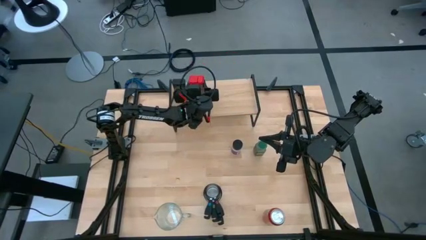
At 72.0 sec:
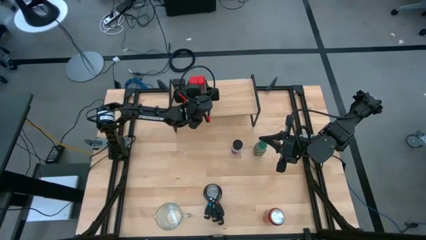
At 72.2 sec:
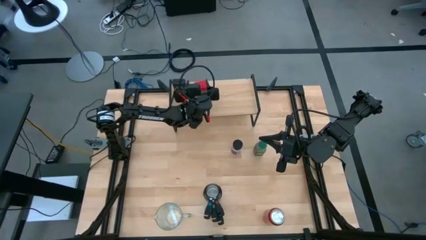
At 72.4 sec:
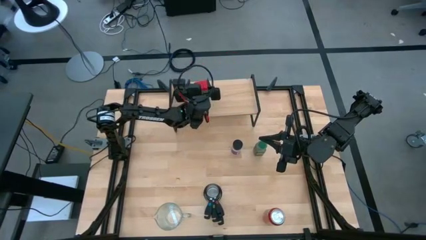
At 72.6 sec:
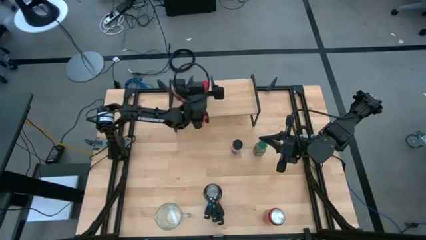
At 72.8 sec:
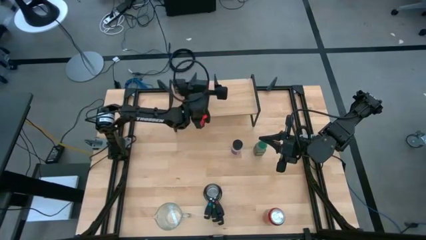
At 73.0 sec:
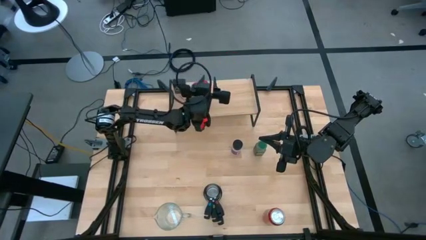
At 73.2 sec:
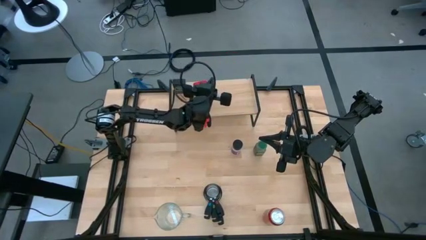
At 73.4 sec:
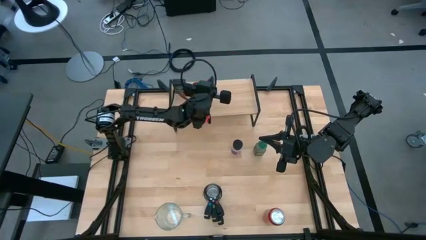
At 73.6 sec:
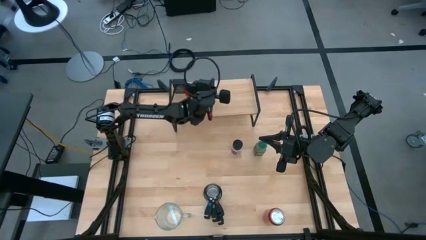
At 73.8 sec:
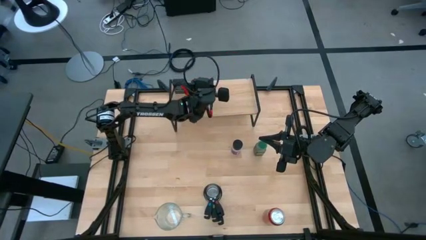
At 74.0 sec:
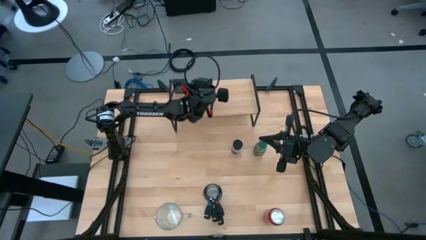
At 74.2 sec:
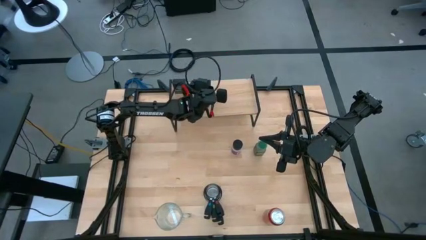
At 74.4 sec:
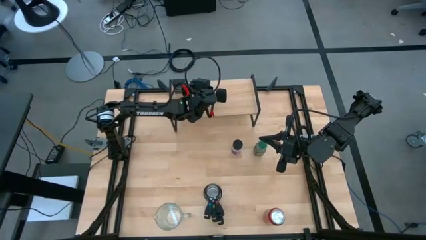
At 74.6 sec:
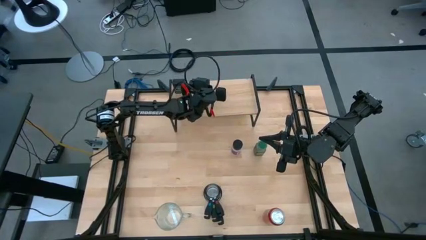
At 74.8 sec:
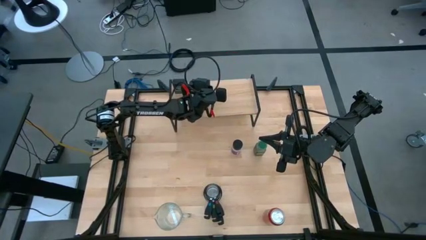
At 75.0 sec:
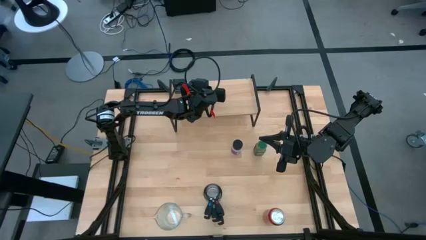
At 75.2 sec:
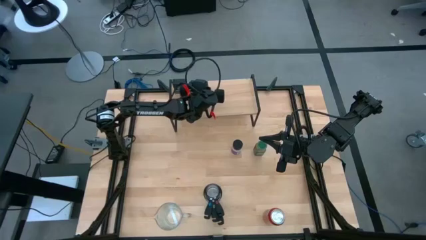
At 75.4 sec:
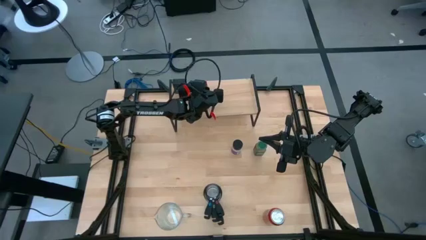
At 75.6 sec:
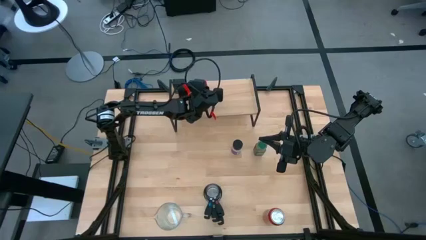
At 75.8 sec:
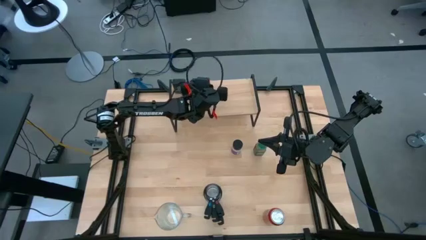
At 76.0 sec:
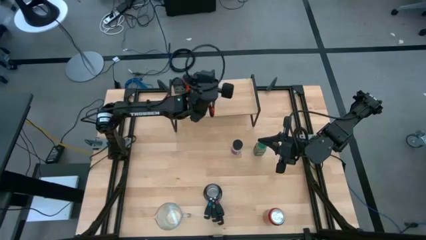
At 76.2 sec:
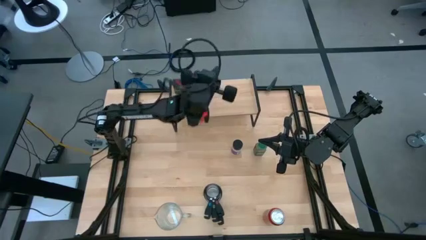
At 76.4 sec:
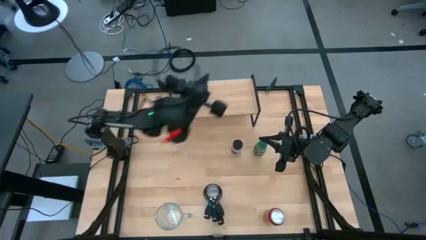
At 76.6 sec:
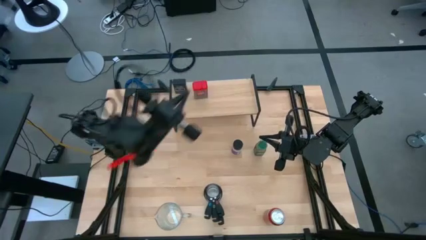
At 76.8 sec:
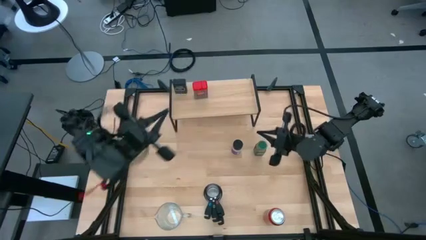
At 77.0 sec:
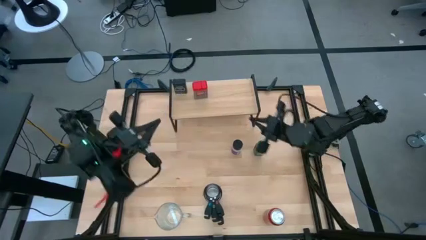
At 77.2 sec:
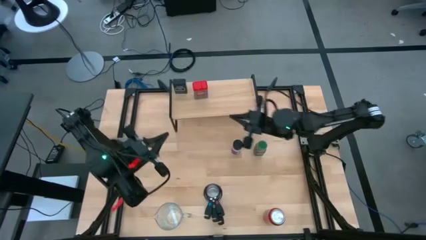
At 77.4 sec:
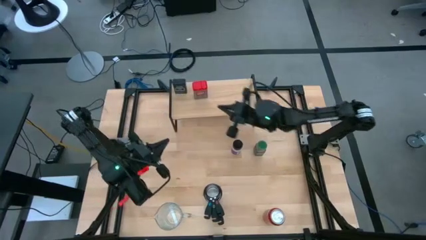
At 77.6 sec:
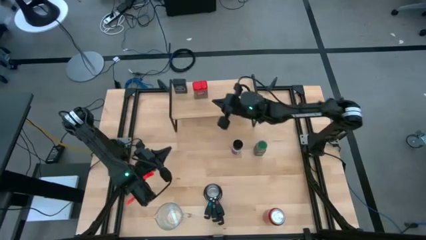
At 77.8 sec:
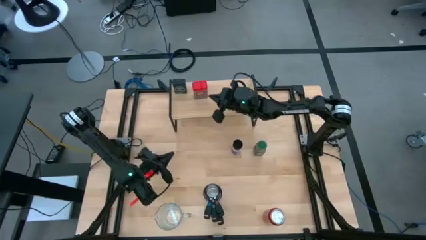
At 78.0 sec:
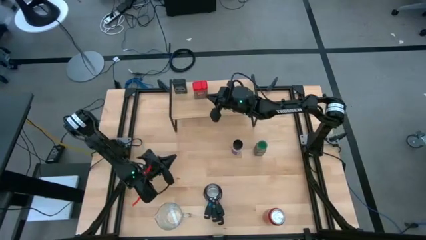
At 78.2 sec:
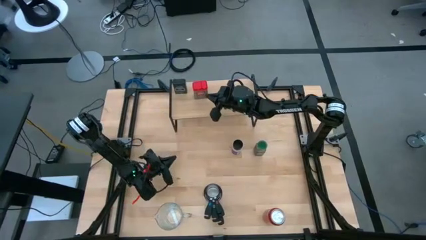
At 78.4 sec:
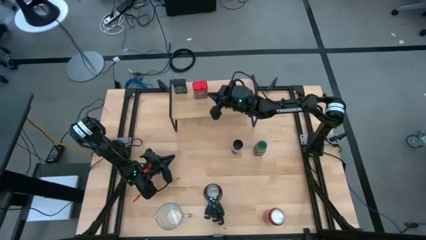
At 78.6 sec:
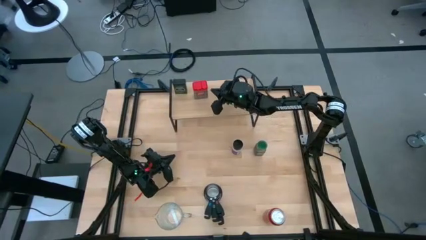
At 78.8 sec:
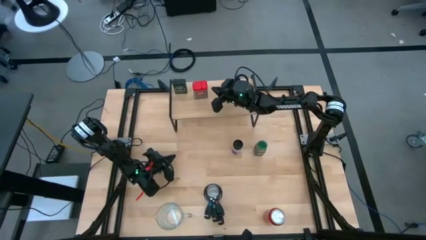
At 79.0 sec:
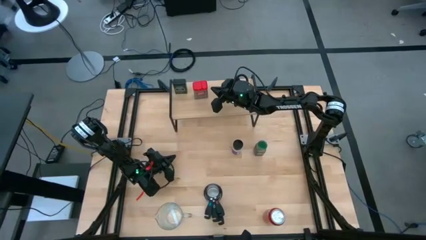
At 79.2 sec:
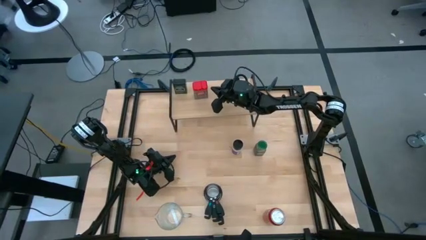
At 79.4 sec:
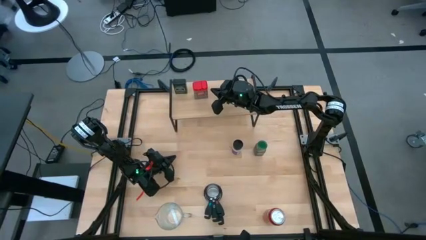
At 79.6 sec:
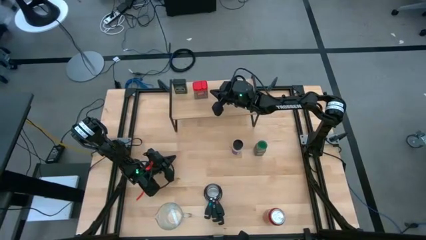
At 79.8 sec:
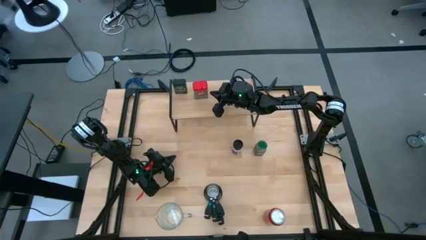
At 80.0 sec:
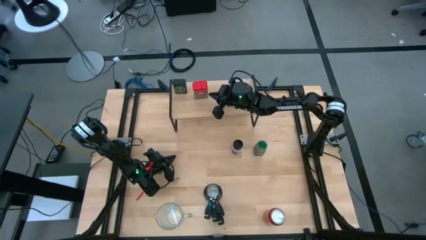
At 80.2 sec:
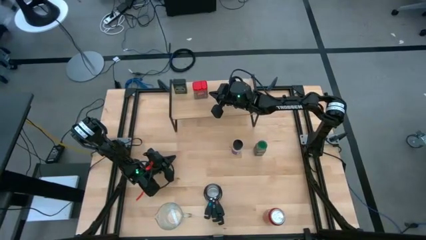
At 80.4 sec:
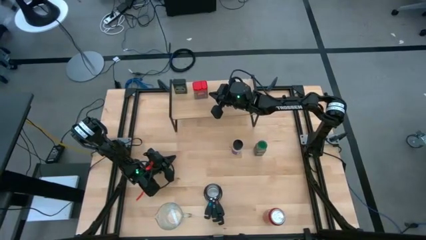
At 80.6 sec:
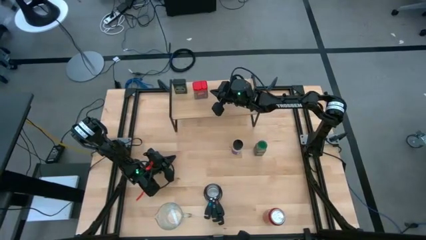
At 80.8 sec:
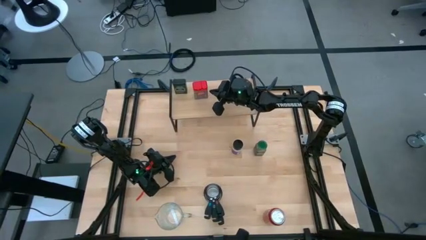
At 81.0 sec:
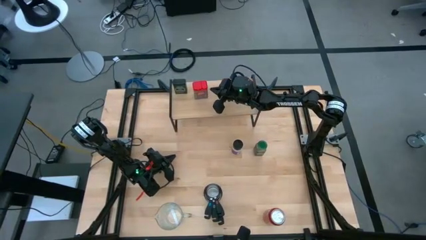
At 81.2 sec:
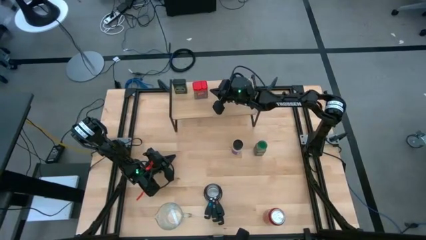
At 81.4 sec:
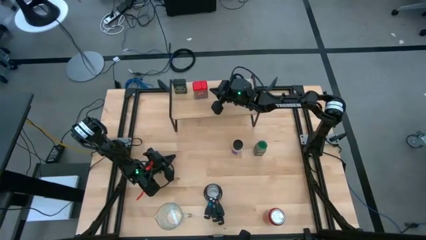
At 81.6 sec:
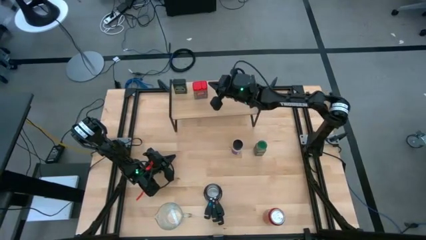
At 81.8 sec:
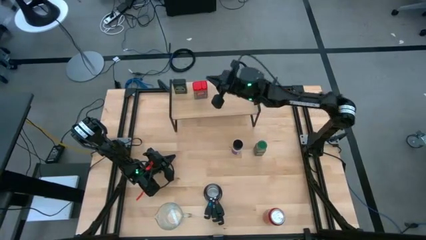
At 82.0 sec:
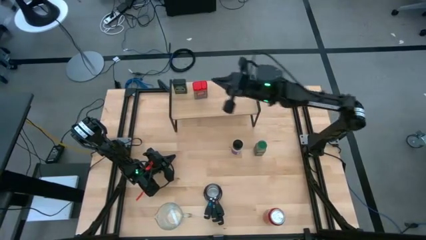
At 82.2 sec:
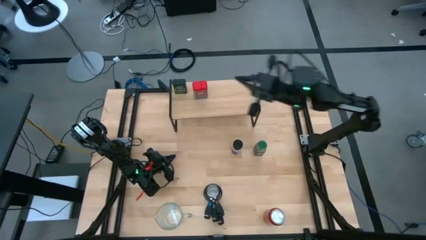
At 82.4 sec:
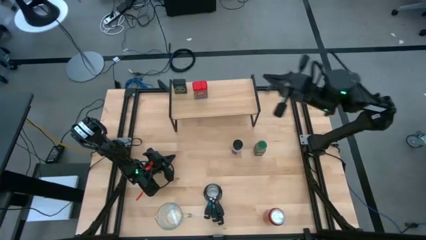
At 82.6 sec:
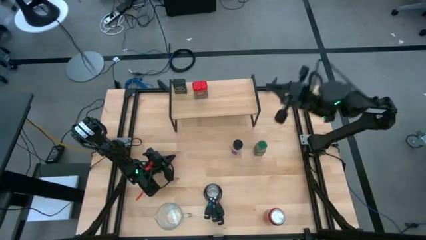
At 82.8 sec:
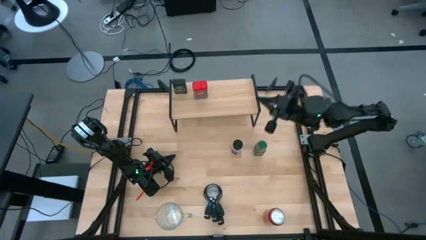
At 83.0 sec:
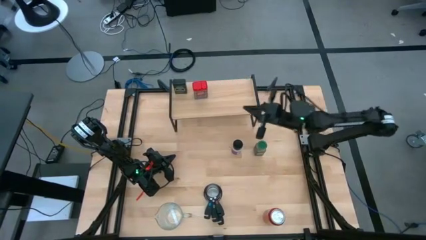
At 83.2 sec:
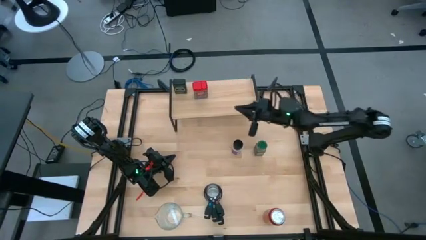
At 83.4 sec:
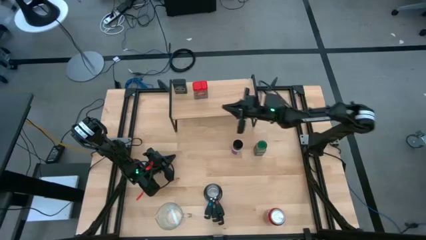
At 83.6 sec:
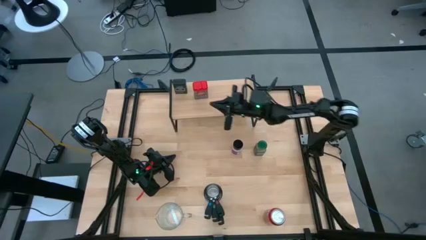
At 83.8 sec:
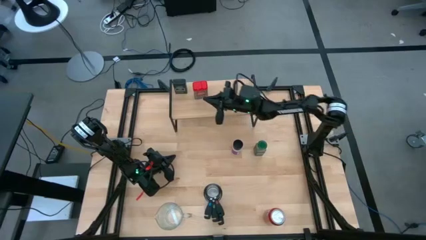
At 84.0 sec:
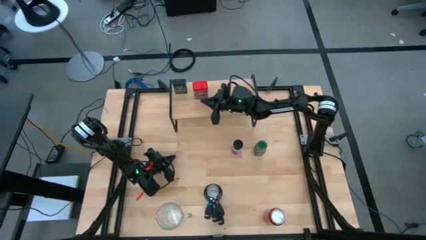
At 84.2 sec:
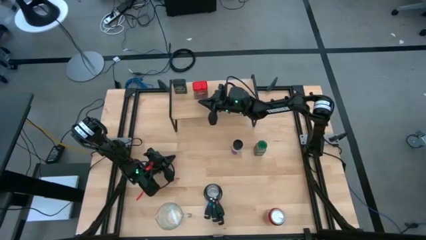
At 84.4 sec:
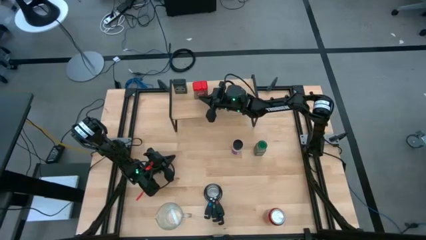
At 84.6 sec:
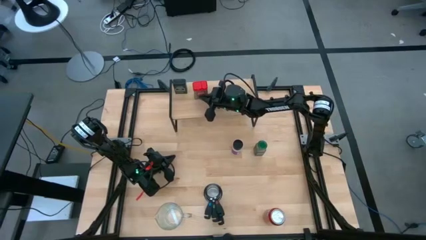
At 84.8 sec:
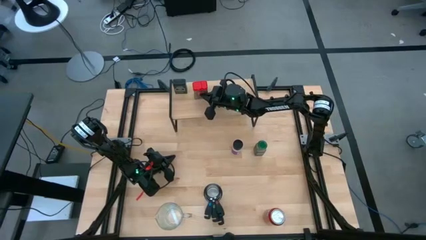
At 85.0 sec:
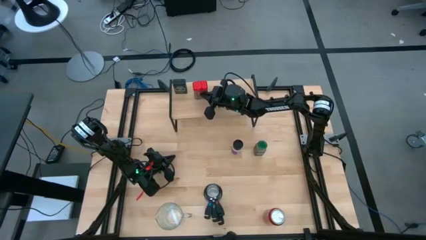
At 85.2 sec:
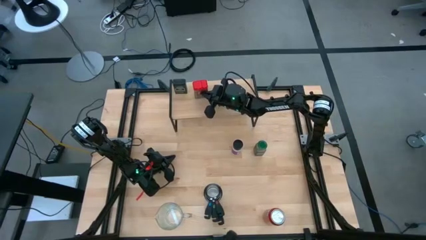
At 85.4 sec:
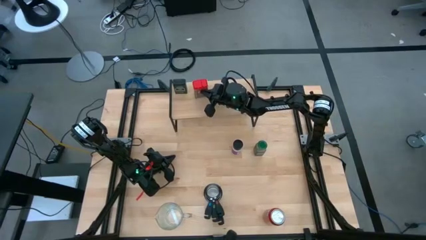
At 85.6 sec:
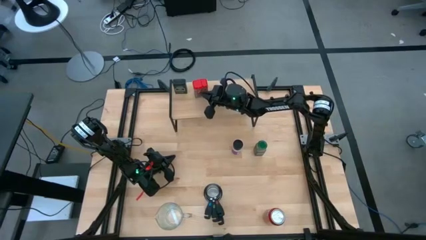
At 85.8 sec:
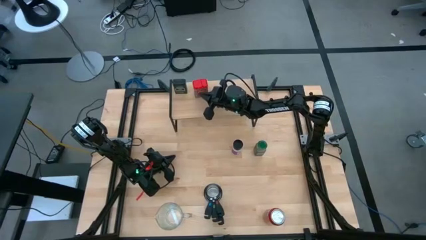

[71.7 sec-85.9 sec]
Task: Shelf spices
Put the red seasoning can on the shelf

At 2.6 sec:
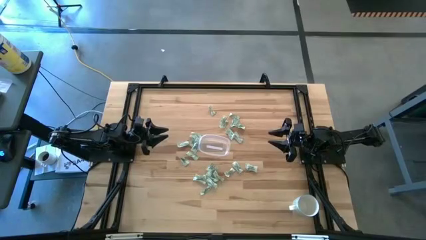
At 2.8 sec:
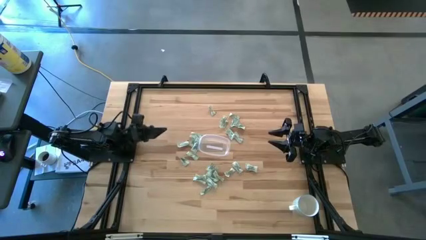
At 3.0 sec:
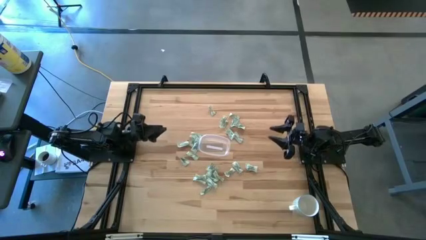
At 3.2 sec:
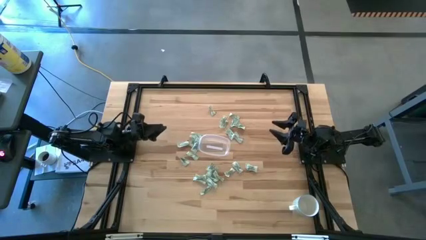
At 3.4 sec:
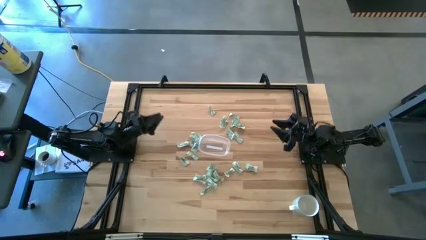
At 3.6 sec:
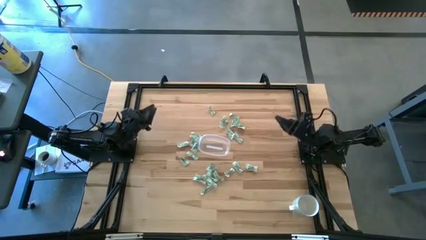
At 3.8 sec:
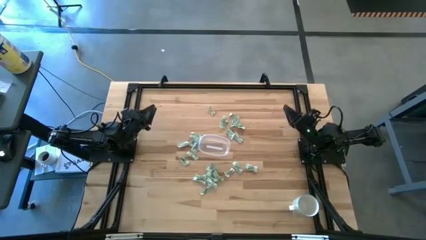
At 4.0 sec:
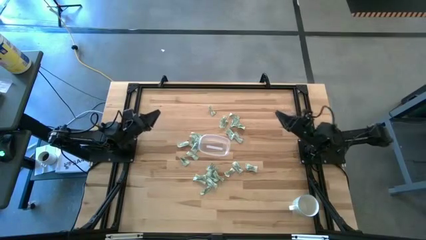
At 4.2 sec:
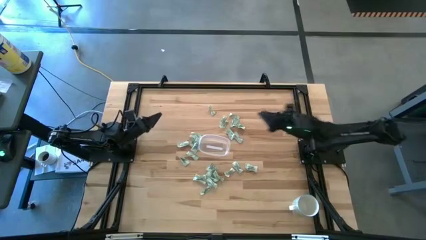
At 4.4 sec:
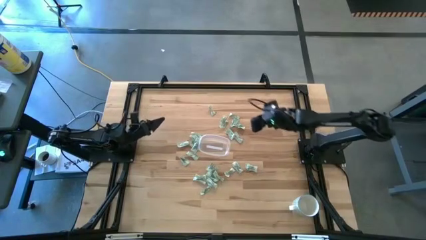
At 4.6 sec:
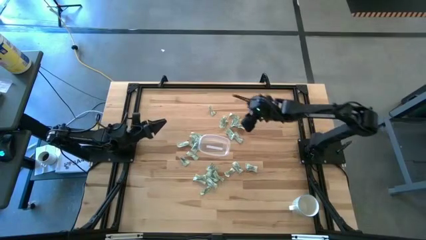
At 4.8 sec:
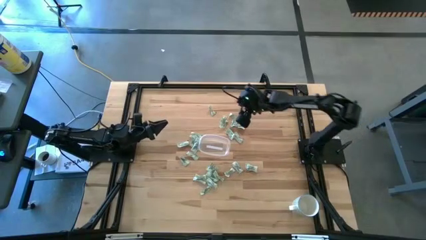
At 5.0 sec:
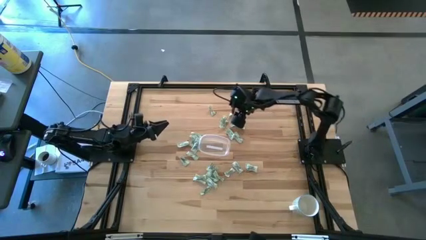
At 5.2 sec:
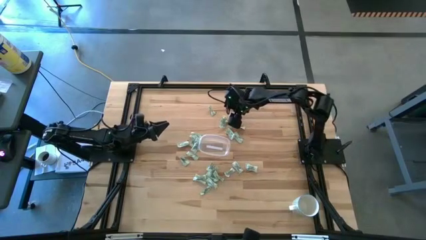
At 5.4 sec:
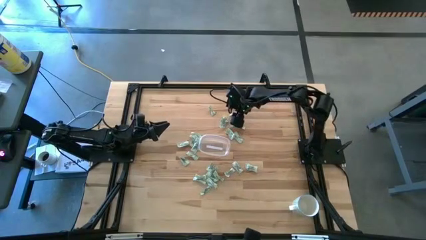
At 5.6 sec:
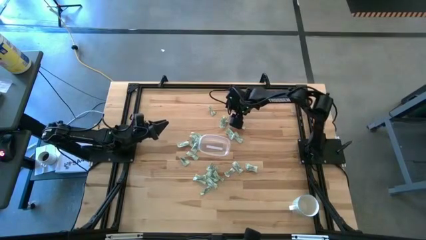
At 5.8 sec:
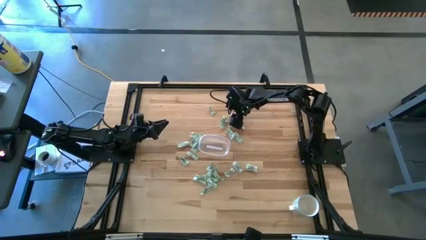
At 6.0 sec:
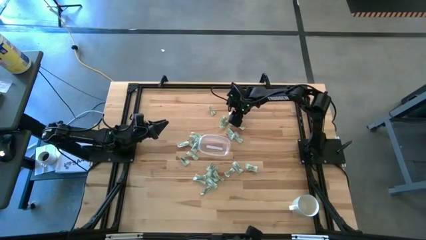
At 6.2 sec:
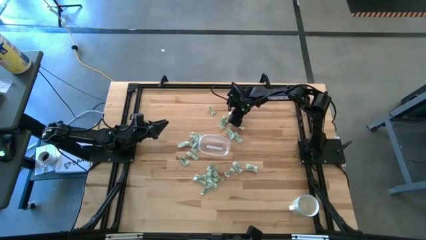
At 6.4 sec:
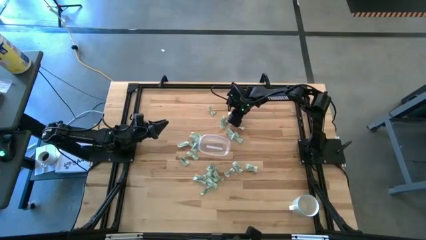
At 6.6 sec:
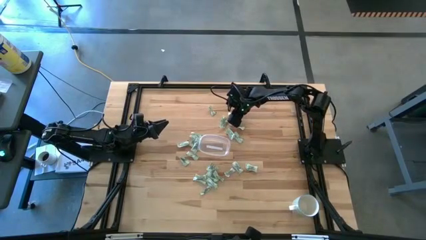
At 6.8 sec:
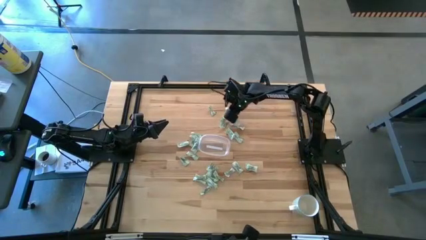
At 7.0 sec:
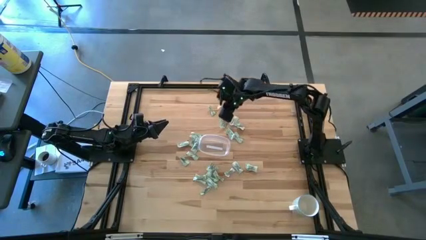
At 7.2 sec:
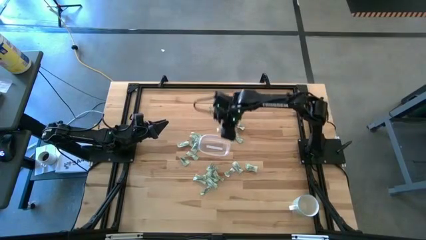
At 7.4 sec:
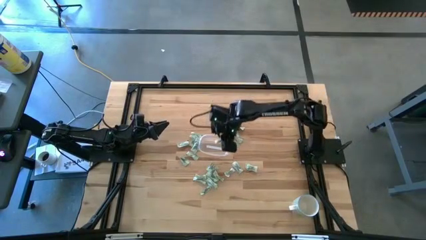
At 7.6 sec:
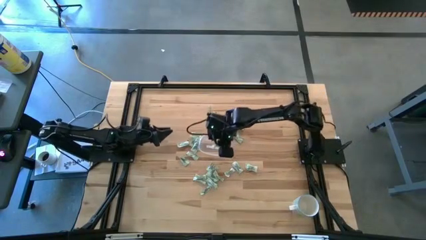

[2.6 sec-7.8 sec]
Task: Pick and place Stevia / Truvia into bins
Put the stevia packet into the transparent container
